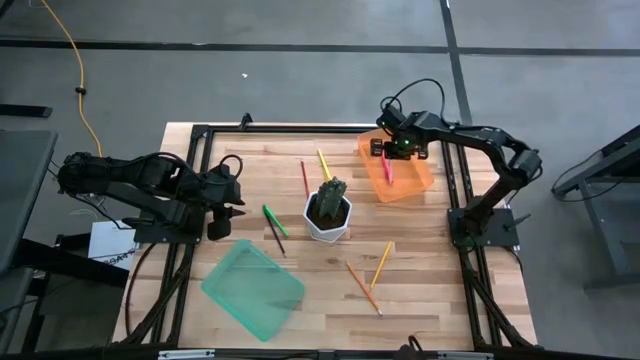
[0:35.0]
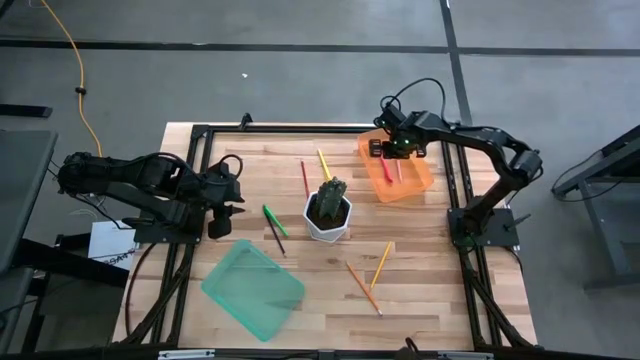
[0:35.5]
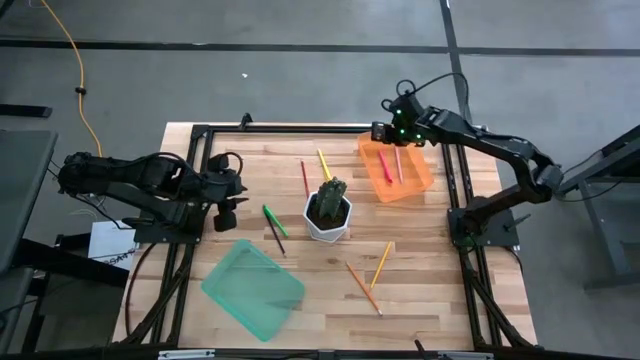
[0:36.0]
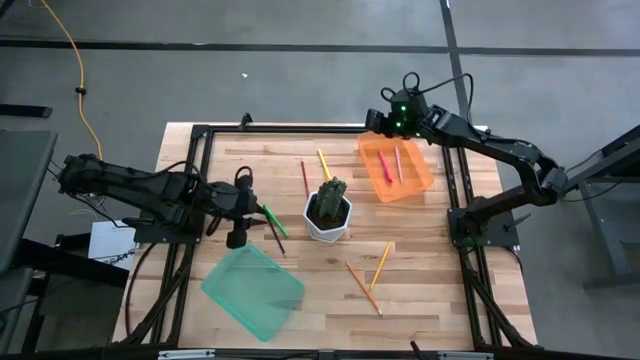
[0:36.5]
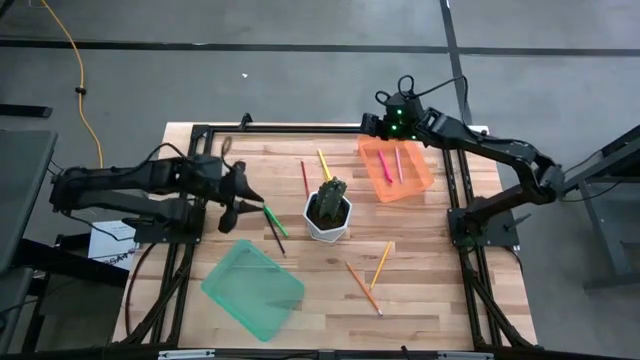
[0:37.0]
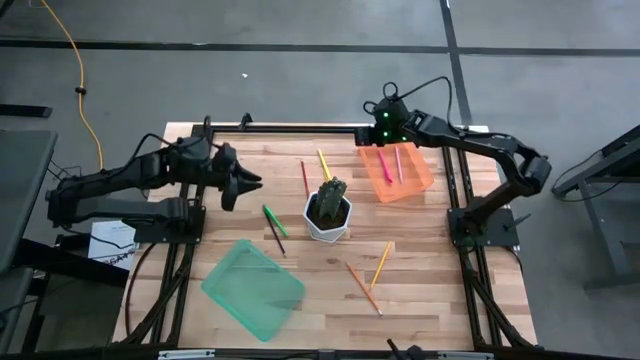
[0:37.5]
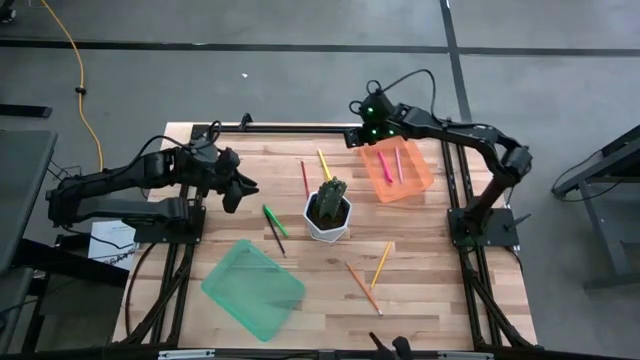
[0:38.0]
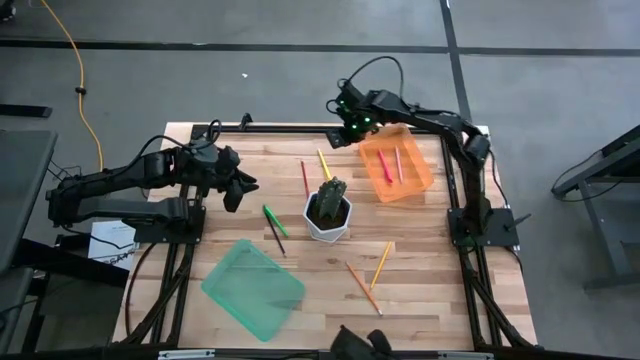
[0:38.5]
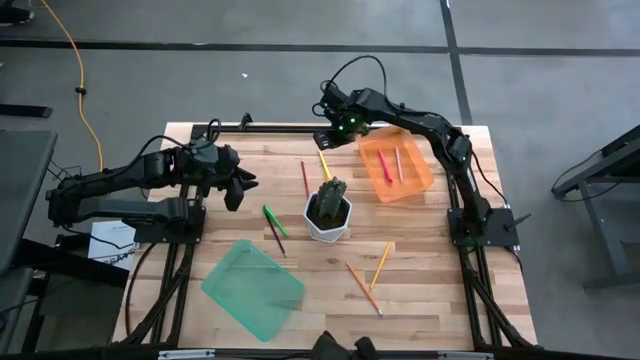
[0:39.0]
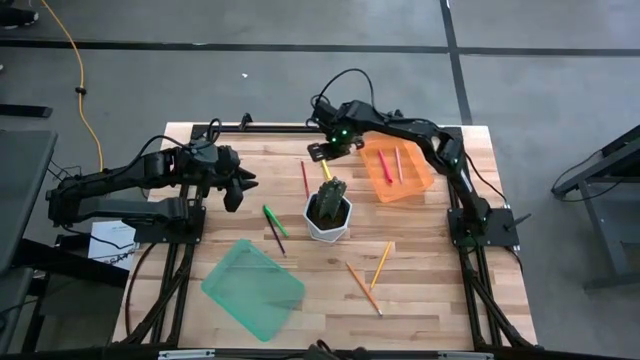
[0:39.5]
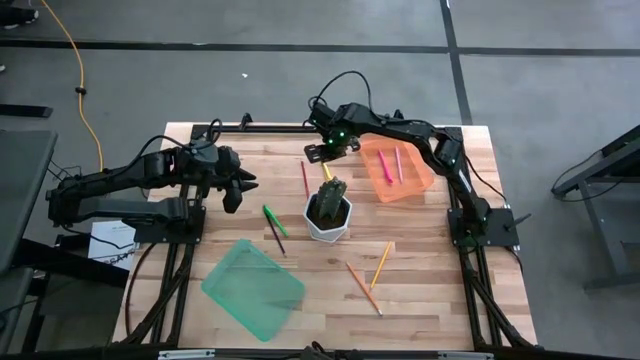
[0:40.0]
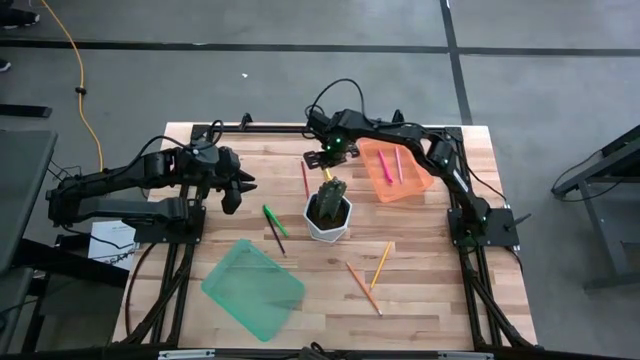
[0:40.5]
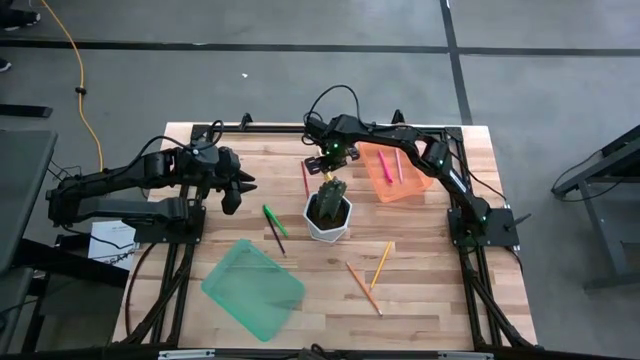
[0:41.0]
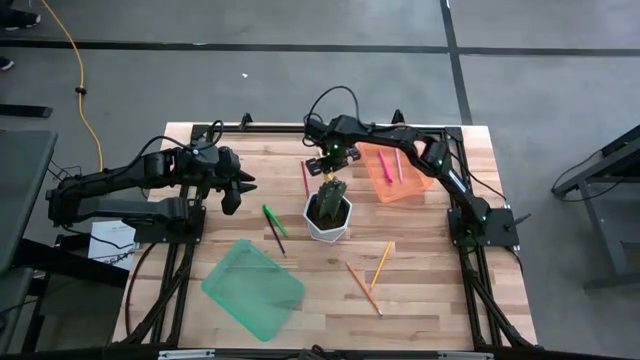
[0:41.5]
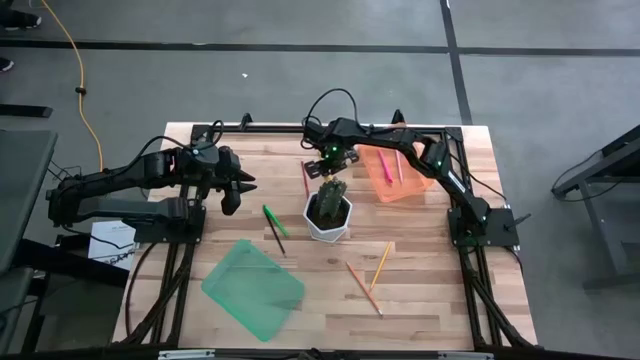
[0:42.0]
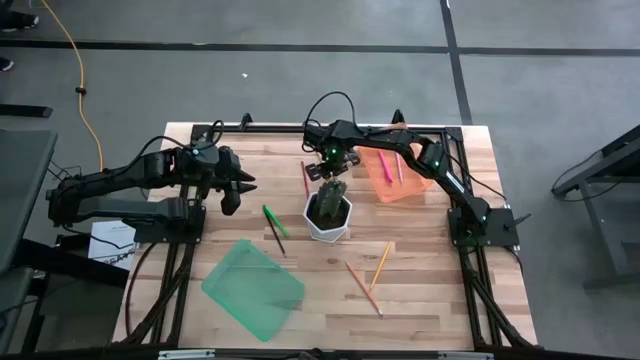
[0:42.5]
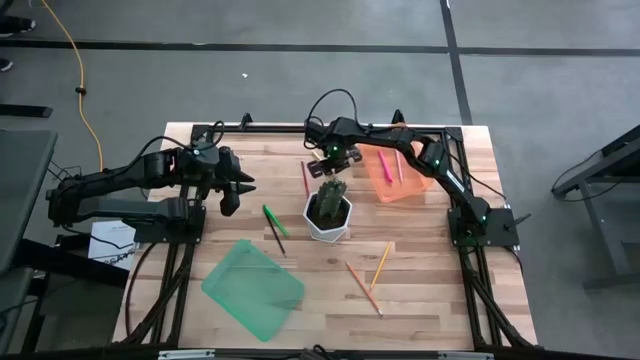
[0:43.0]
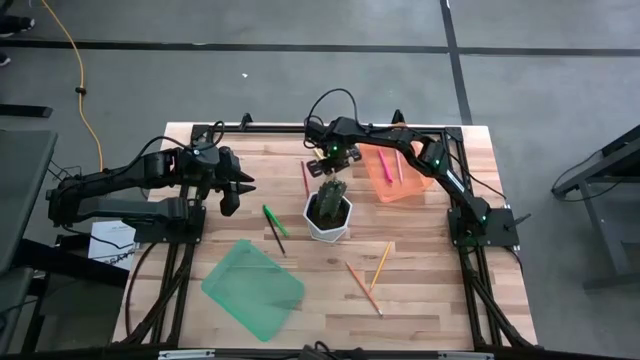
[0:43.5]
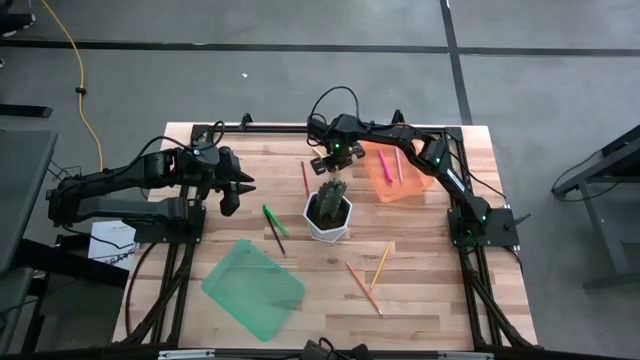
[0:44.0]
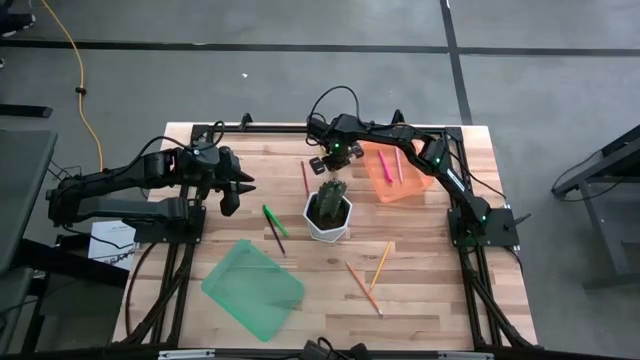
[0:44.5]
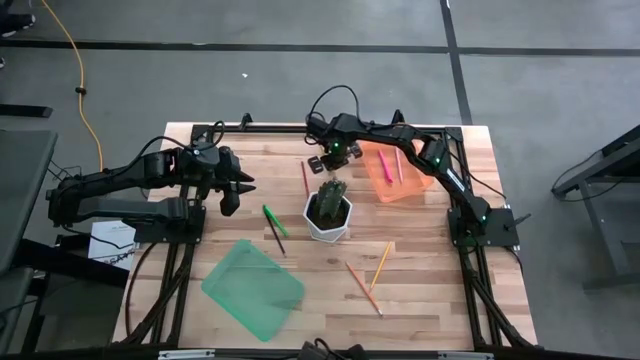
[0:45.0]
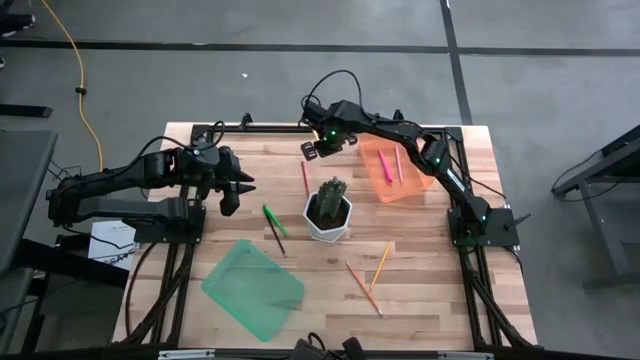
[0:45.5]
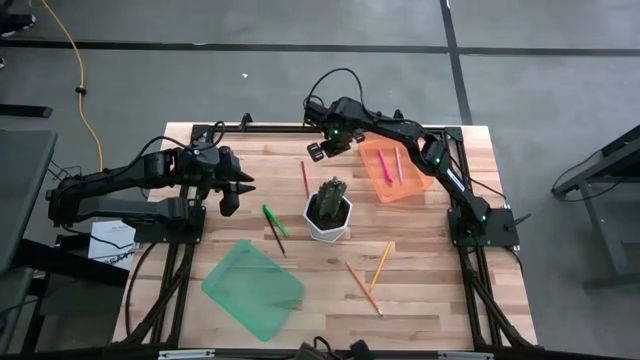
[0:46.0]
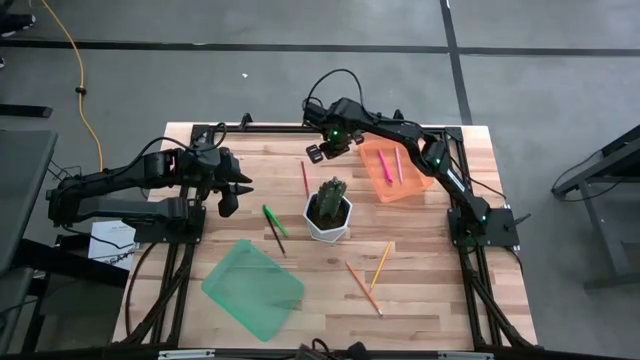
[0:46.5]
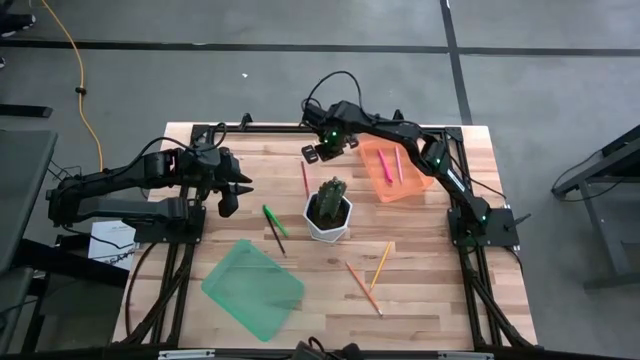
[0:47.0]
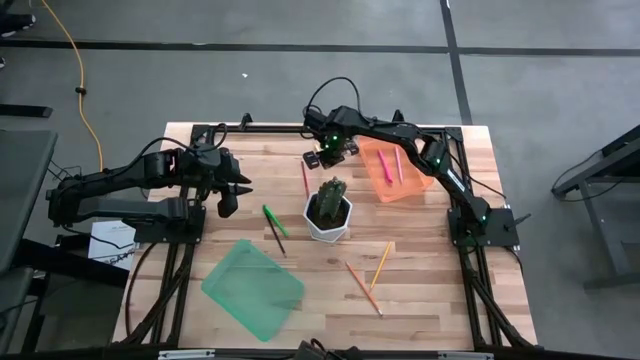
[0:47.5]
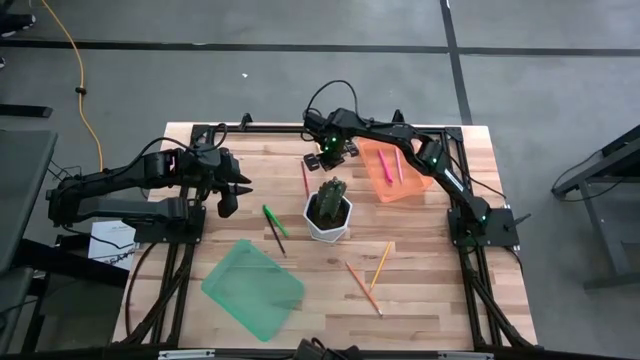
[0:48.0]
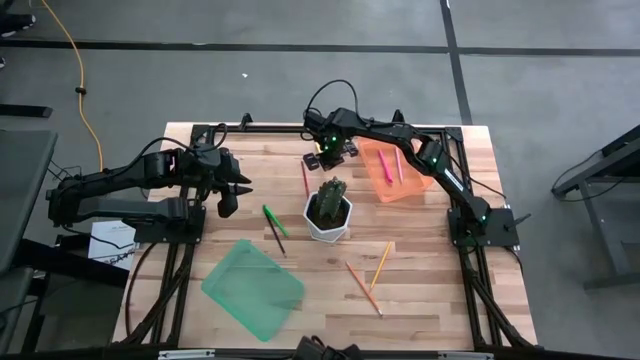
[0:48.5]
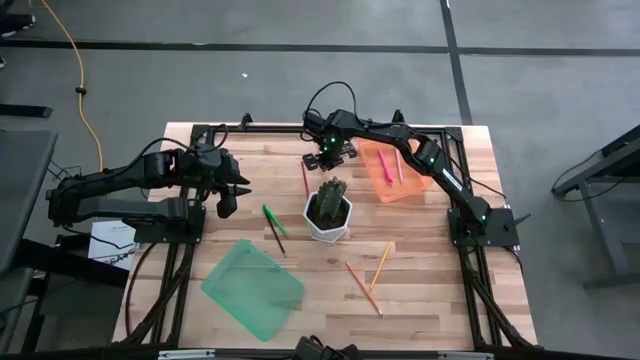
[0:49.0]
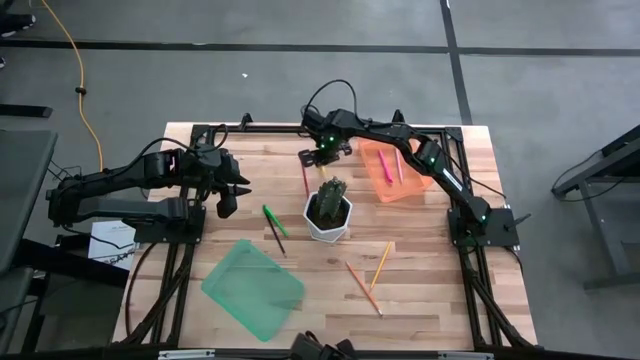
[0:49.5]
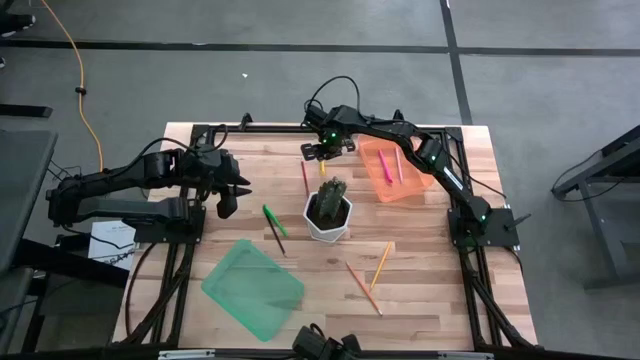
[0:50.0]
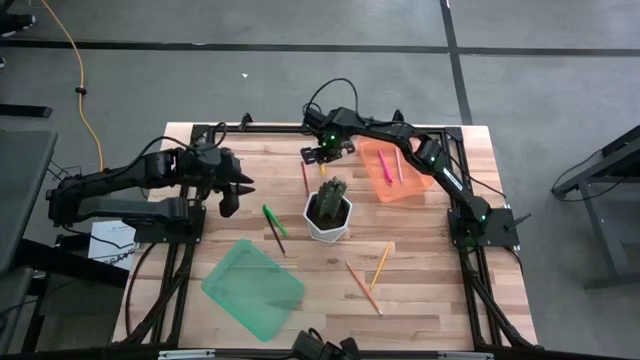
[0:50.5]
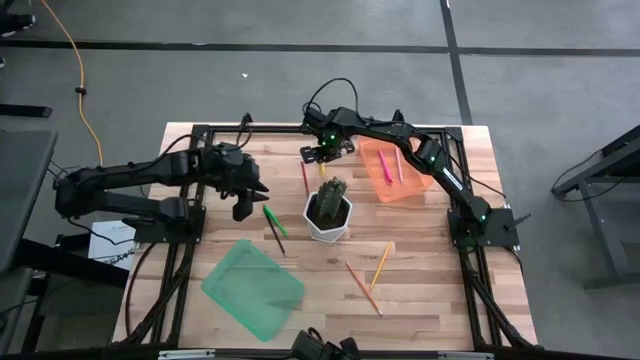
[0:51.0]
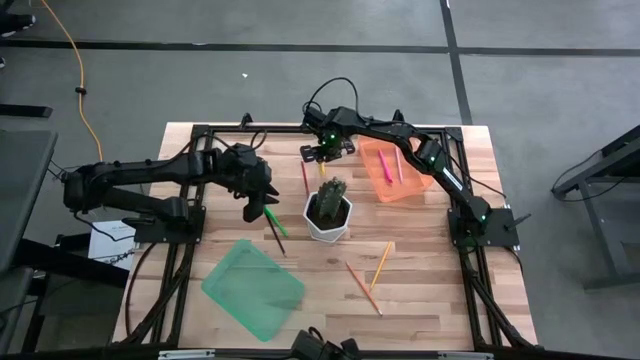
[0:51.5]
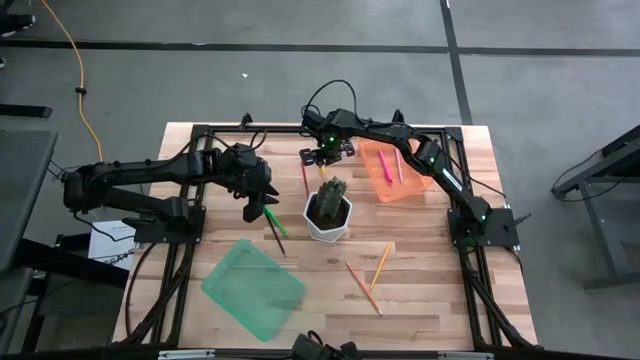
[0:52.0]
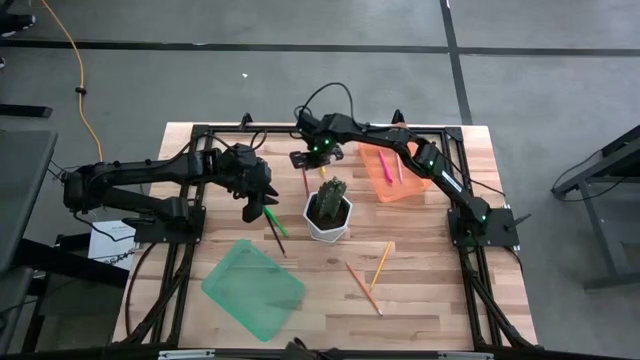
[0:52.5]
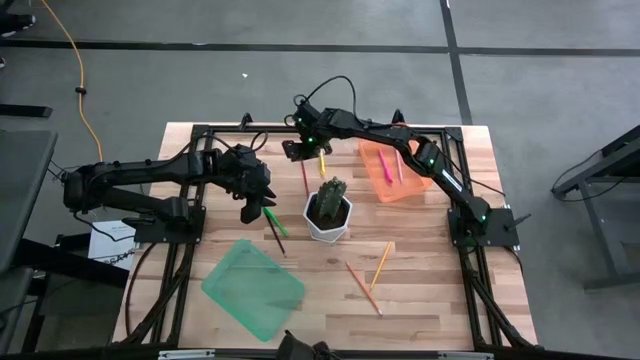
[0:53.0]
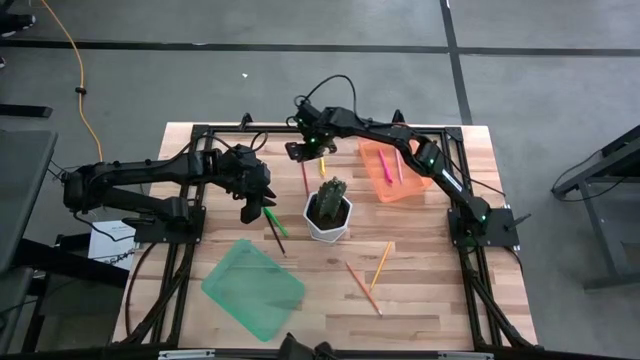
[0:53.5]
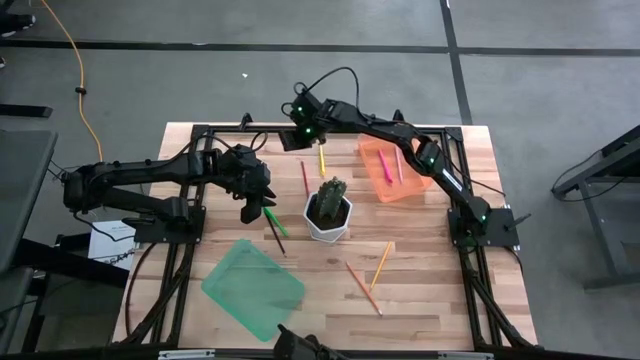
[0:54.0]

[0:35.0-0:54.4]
Task: Sort pens & pencils
Put the yellow pen into the orange bin

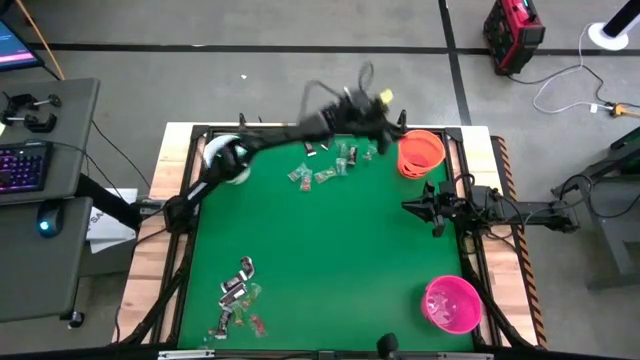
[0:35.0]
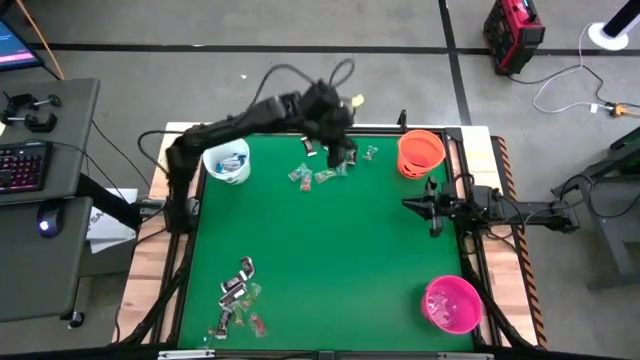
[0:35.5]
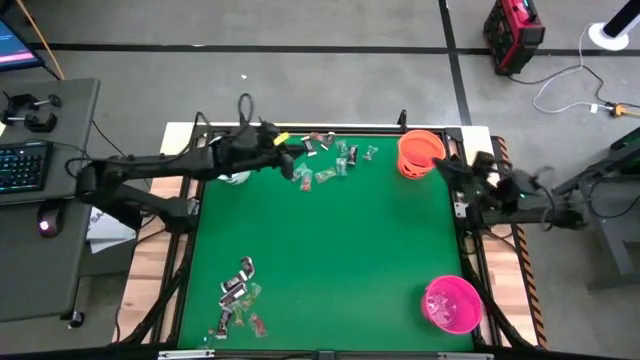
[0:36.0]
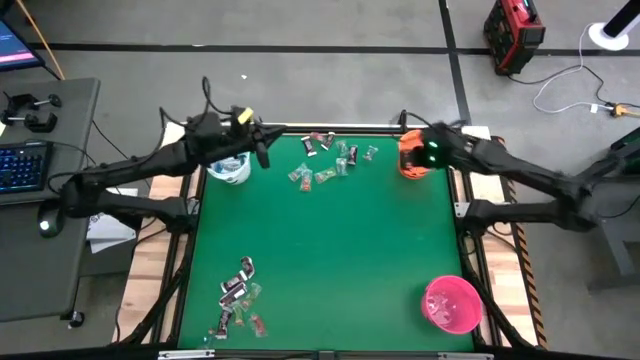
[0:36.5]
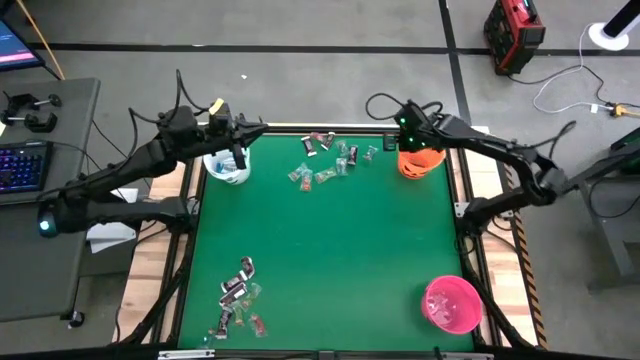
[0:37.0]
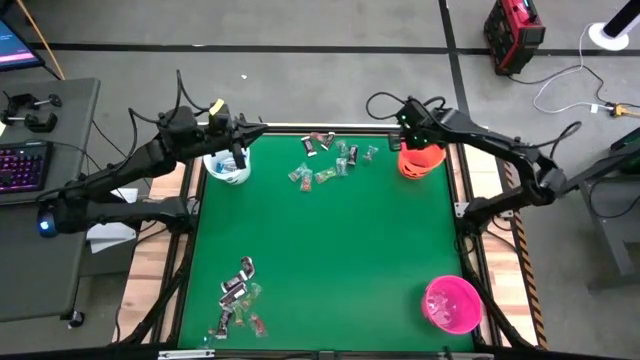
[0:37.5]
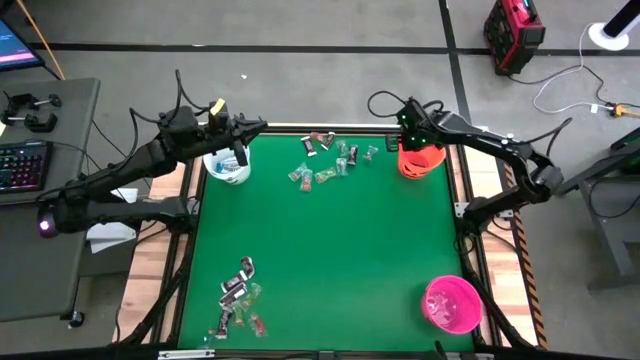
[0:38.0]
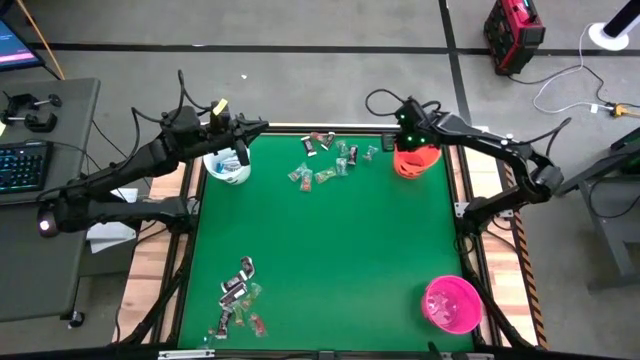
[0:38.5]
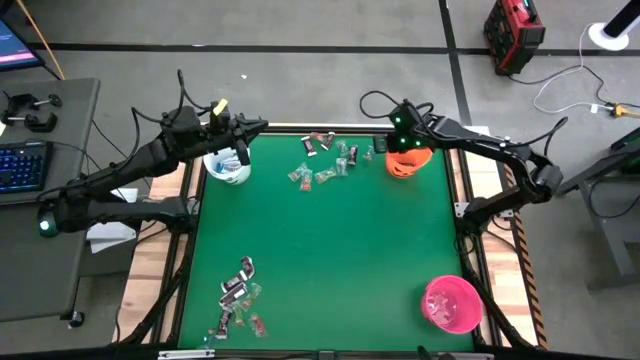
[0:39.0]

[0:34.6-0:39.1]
Task: Sort candy by brand, put in halloween buckets
Adjust the orange bucket
